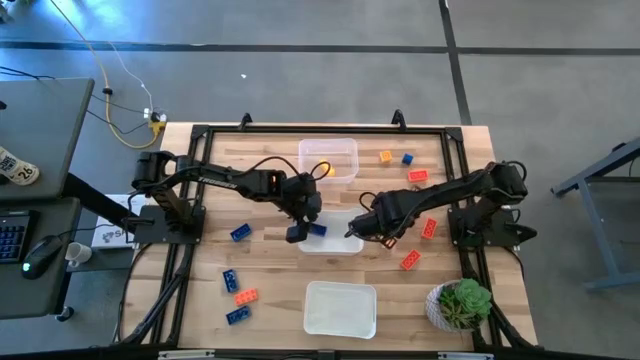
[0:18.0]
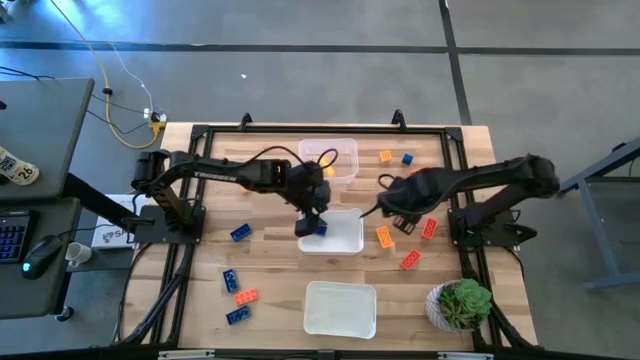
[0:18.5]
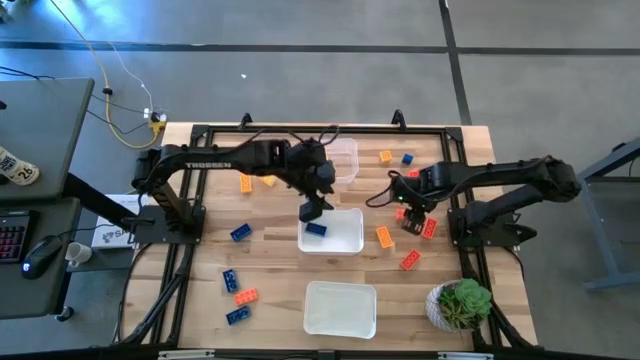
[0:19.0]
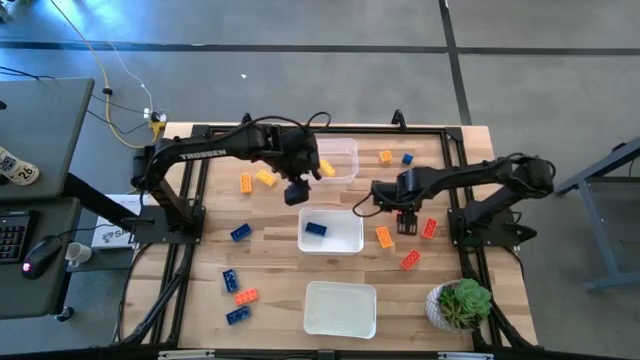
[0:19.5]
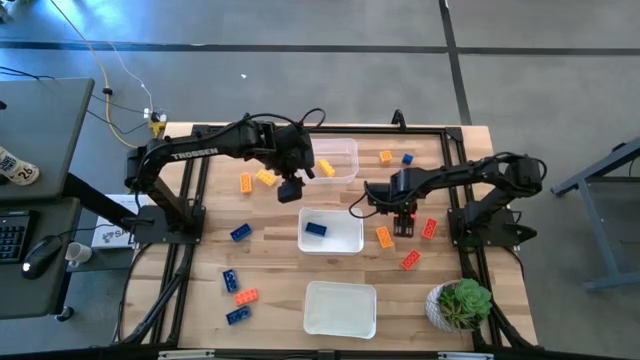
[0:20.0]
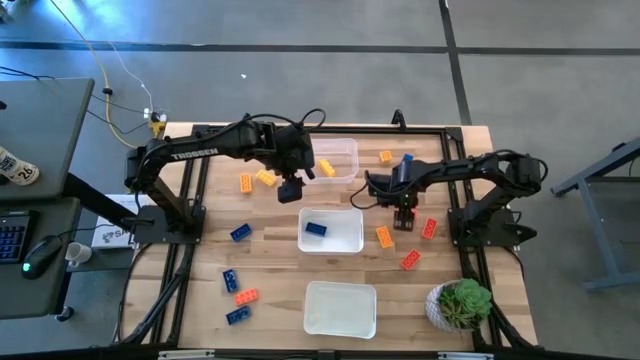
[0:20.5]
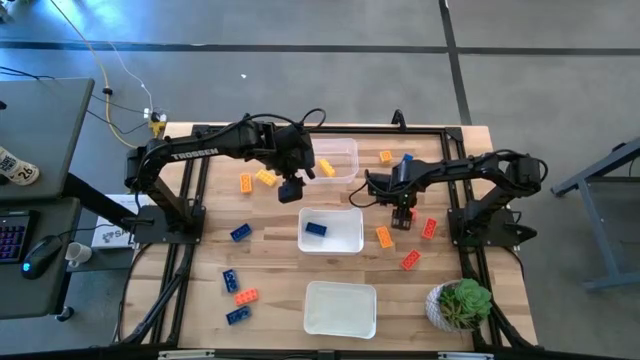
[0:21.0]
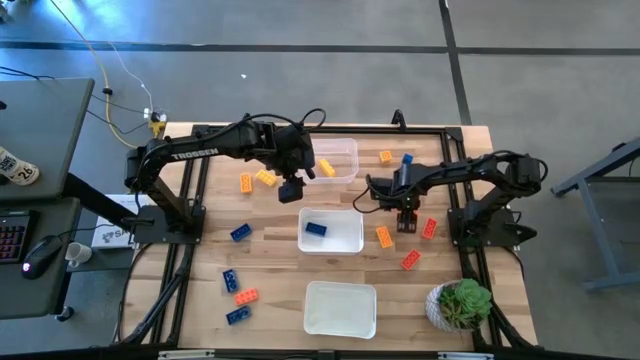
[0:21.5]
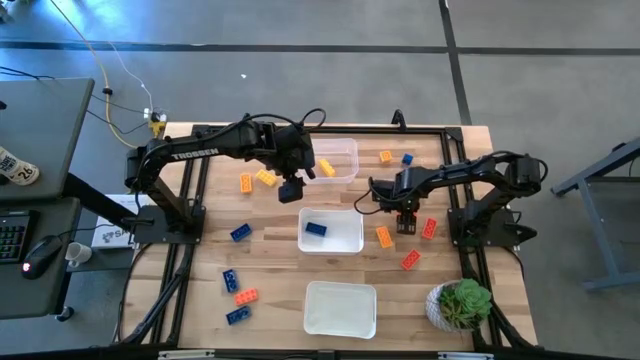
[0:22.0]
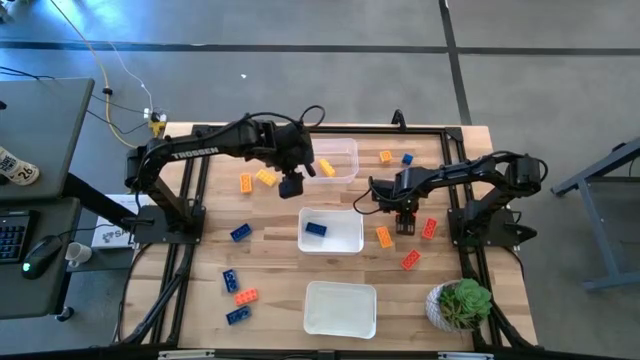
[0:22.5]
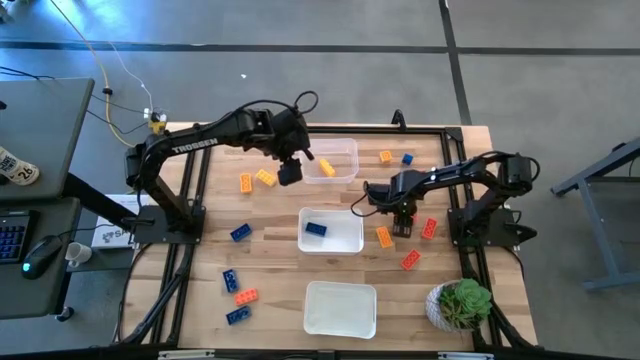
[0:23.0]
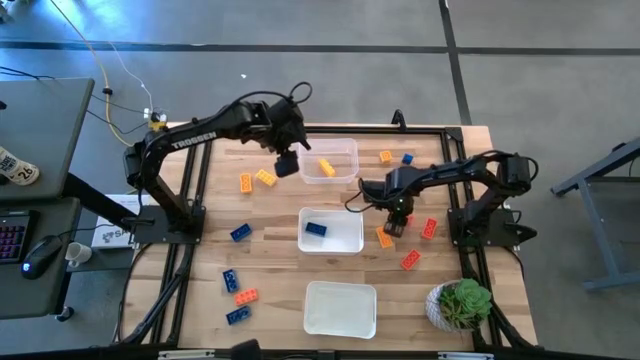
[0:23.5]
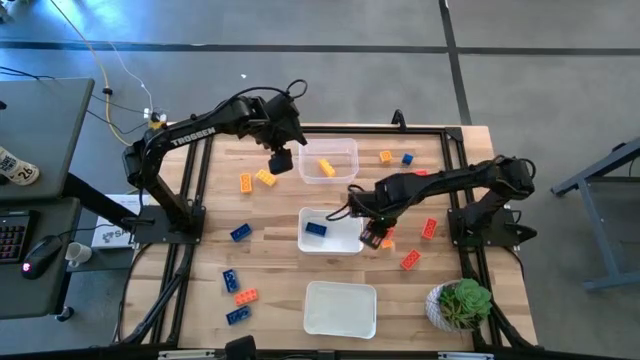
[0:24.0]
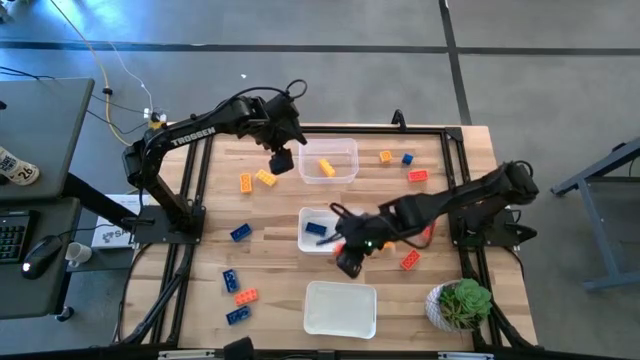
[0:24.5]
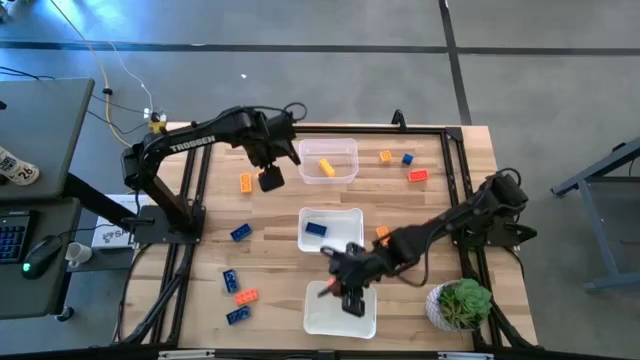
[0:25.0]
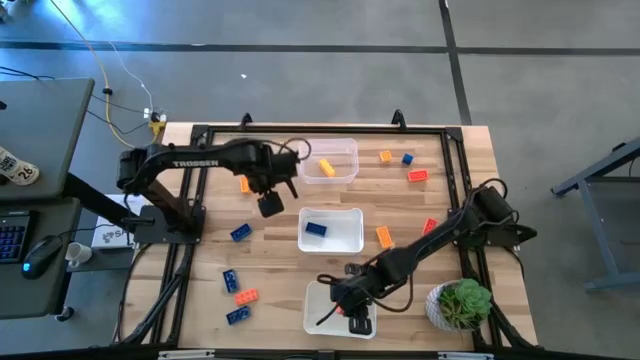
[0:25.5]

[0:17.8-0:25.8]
Task: Sort & place blocks by color
Put the orange game piece into the bottom white bin

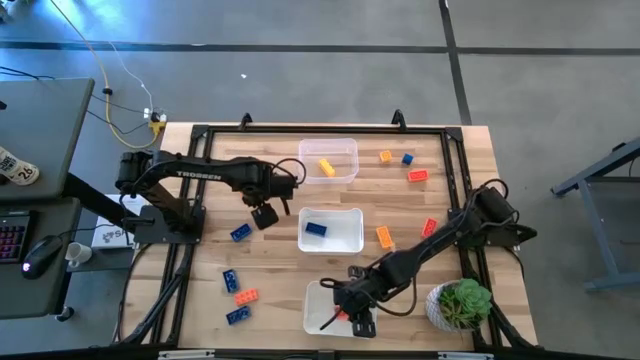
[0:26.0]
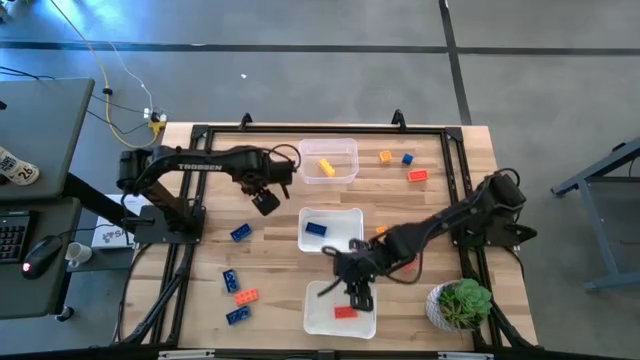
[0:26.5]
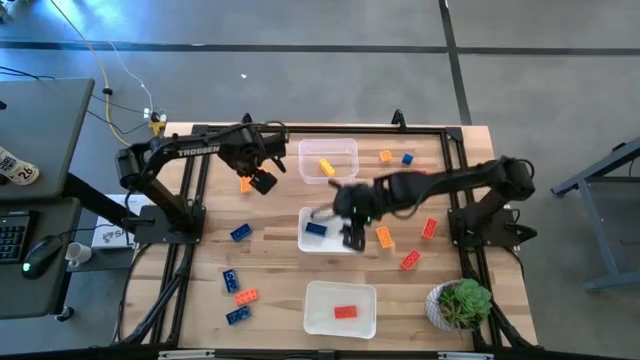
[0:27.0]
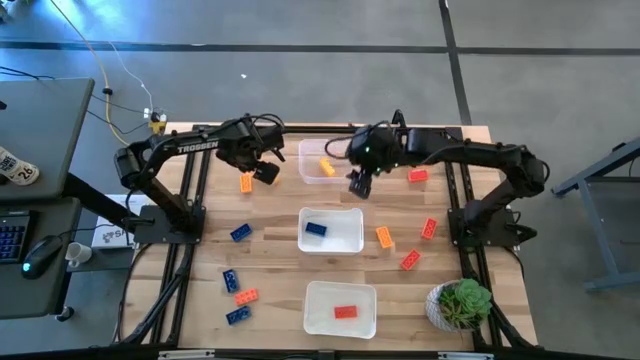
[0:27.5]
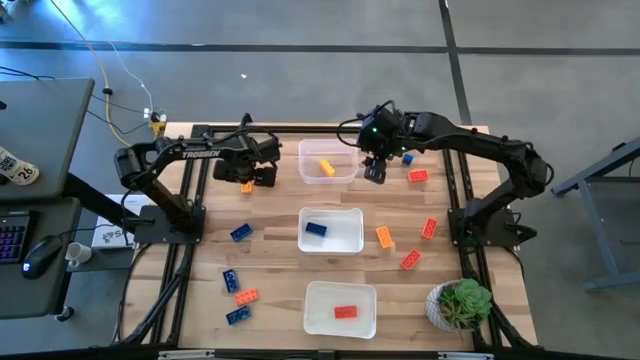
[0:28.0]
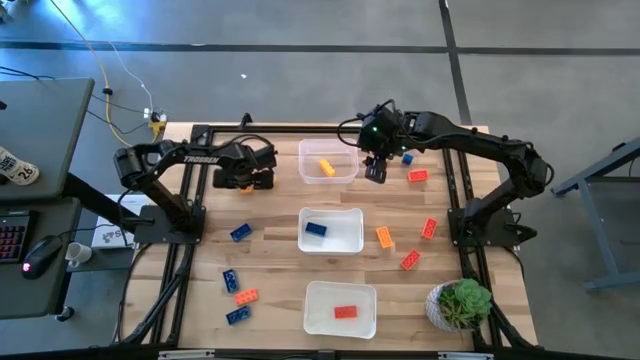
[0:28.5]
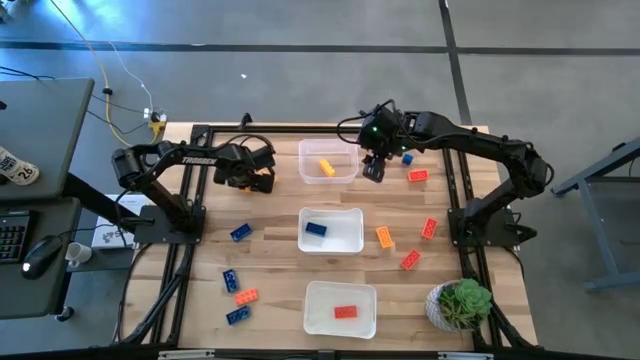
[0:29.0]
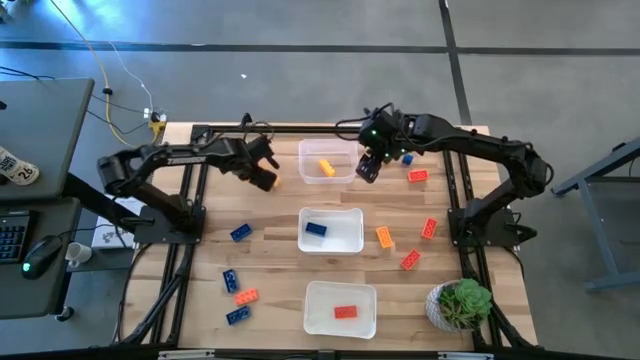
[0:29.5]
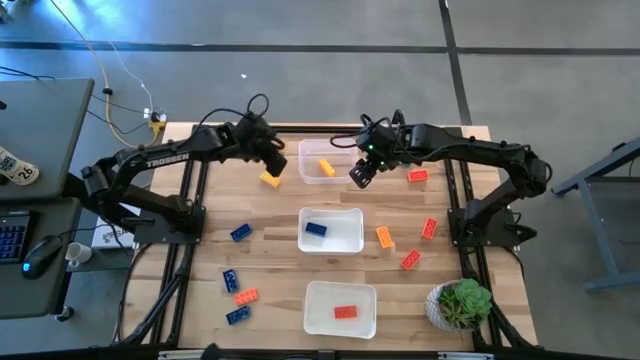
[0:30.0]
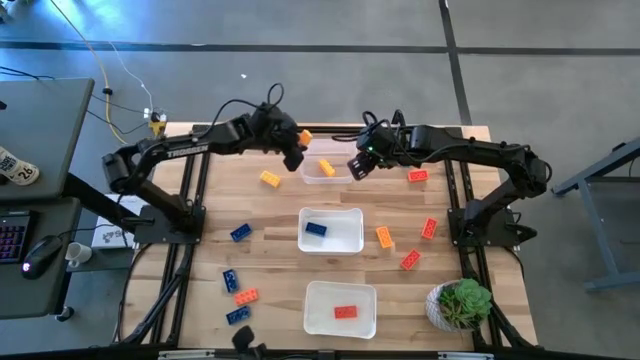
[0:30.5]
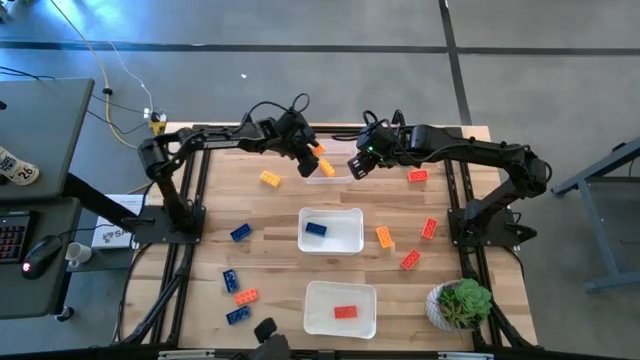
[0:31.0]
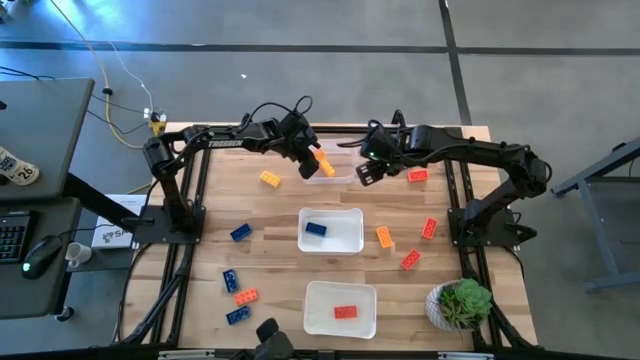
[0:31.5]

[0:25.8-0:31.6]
Put the yellow game piece into the transparent bin

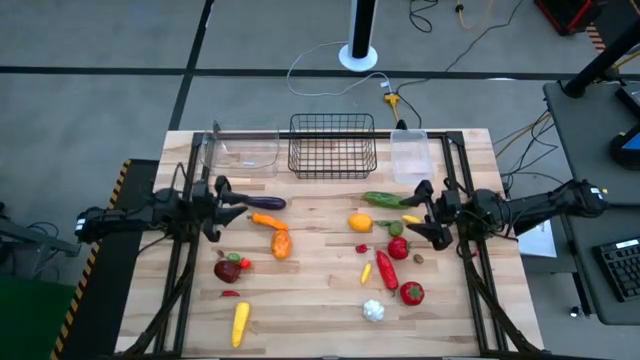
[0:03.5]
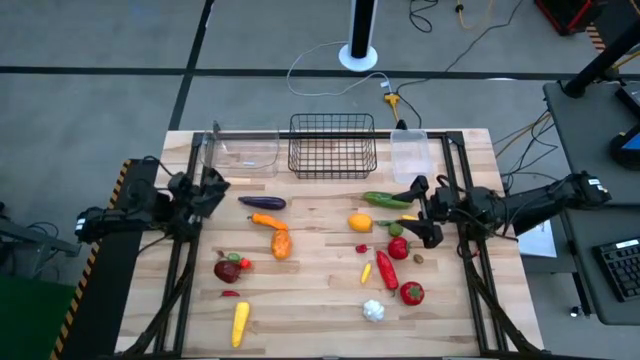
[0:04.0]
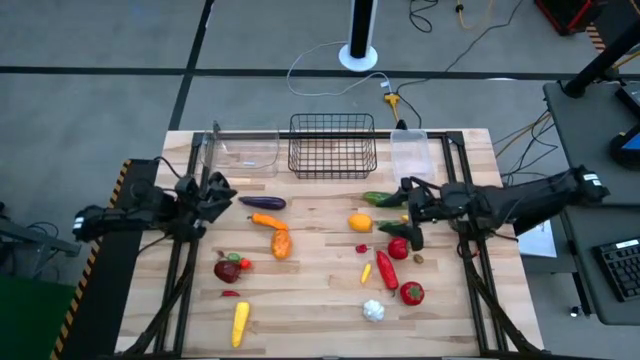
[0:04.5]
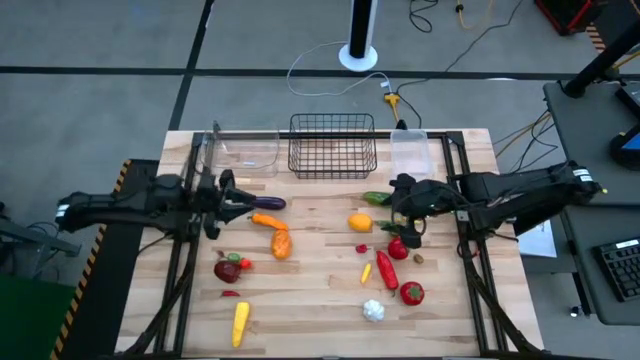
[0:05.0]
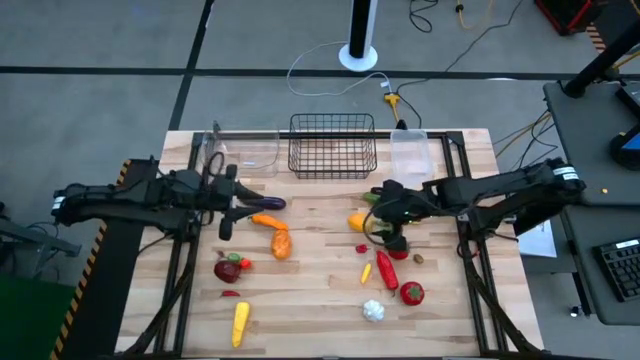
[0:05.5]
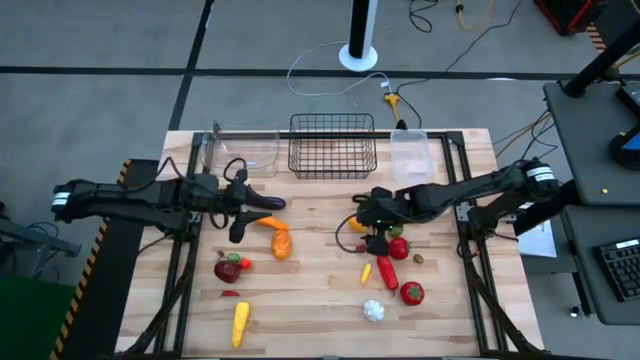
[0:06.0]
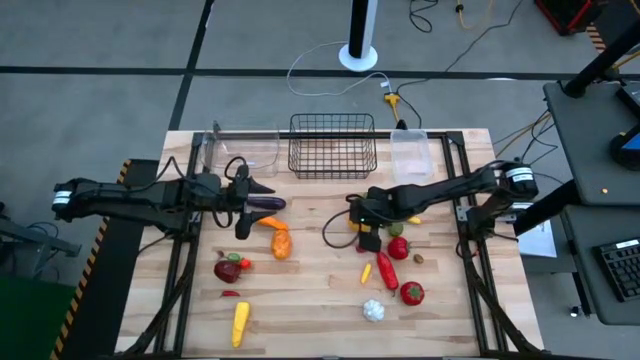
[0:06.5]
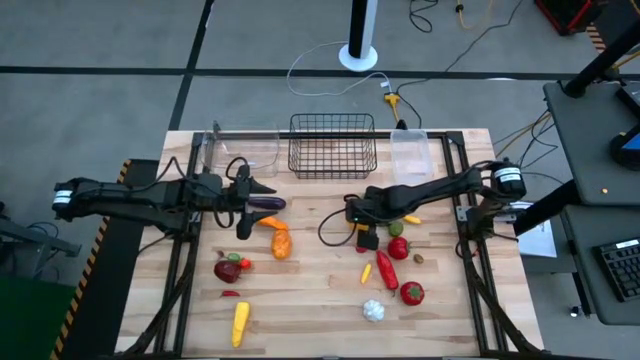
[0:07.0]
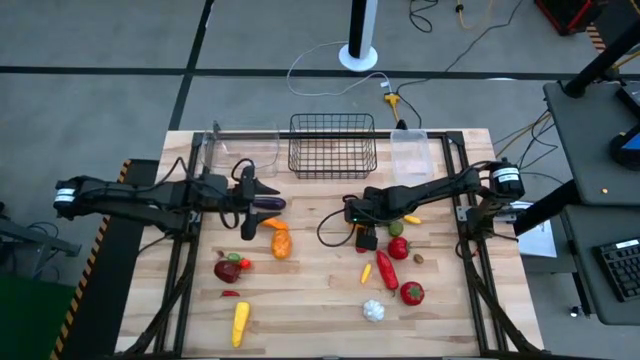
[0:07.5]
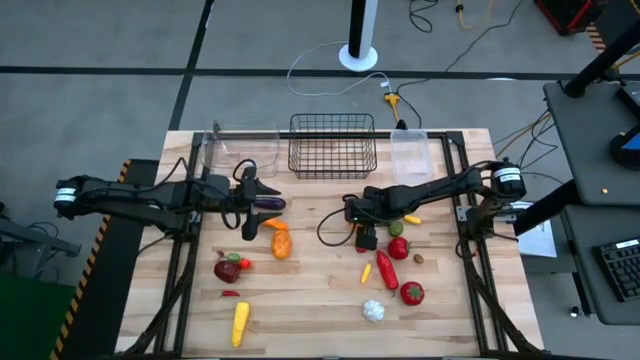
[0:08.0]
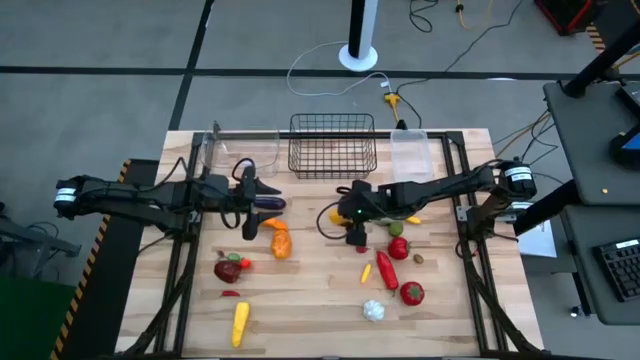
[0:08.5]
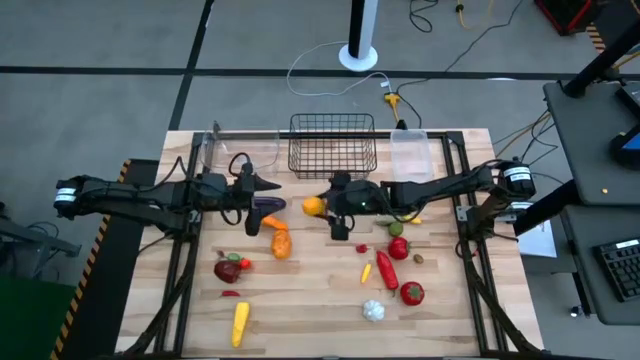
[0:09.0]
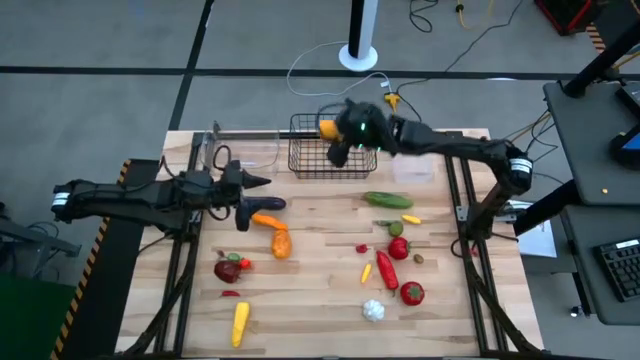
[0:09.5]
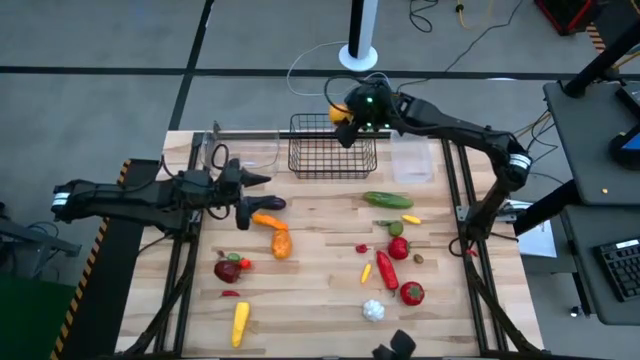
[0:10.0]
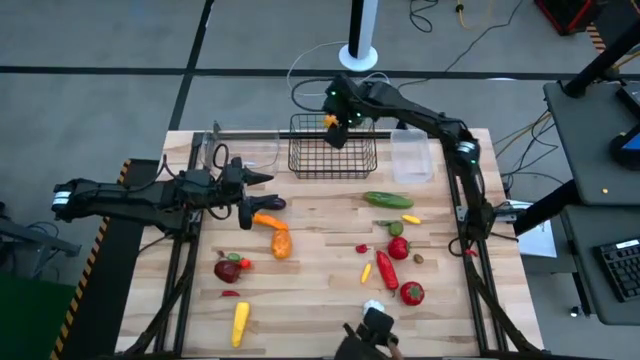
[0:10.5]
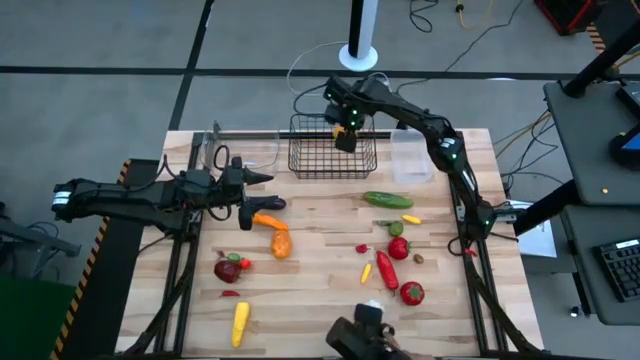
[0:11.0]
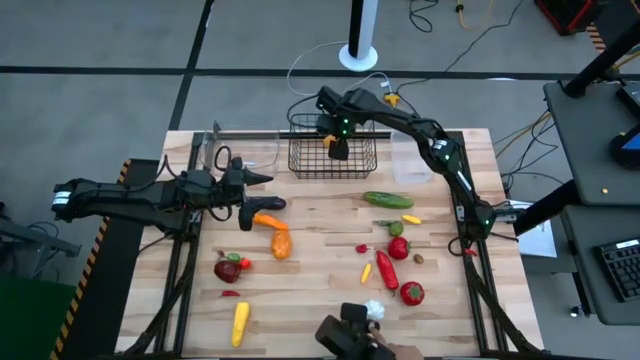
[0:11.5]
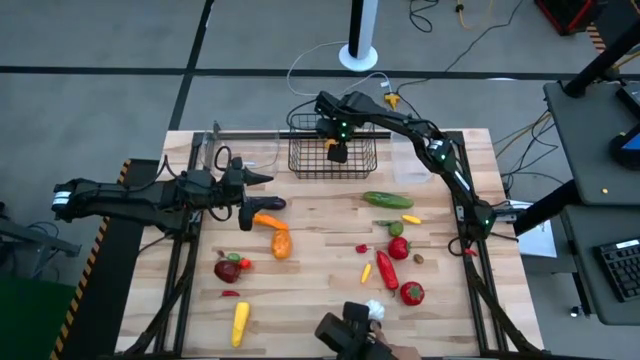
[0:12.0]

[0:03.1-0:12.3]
Task: Sort produce into baskets
Put the lemon into the wire basket
